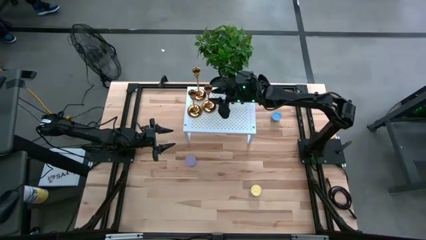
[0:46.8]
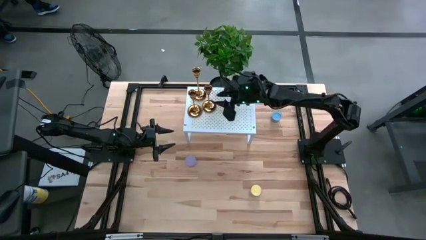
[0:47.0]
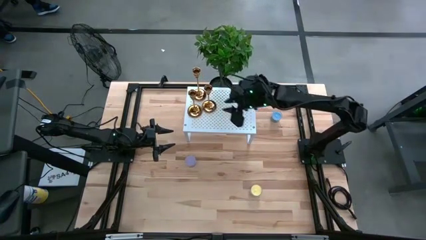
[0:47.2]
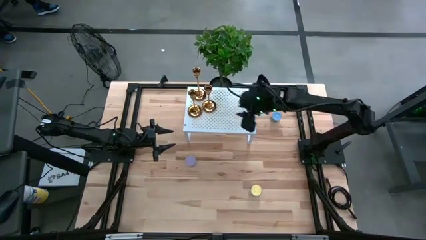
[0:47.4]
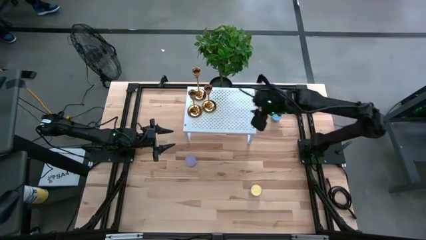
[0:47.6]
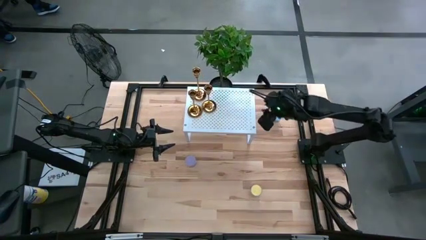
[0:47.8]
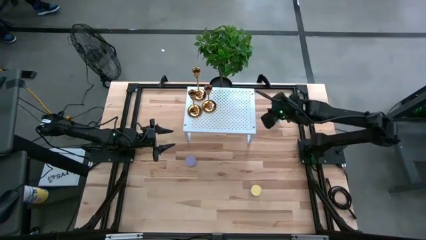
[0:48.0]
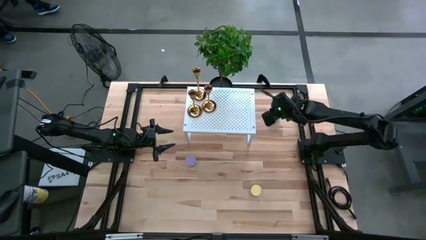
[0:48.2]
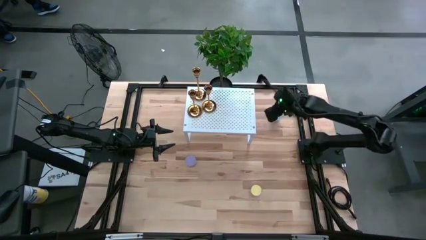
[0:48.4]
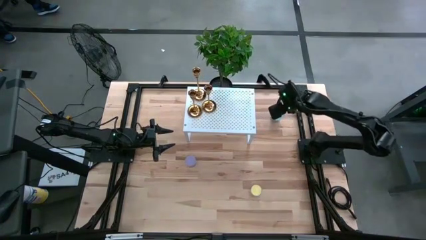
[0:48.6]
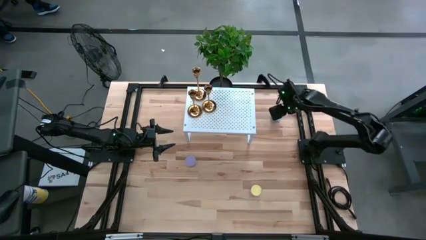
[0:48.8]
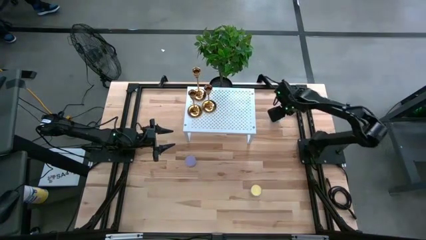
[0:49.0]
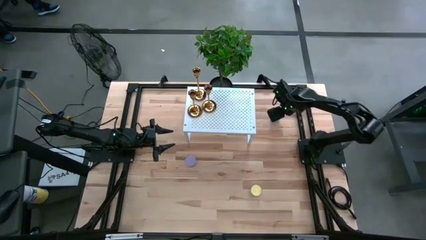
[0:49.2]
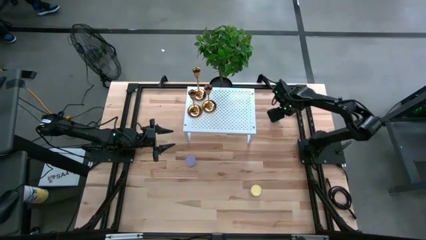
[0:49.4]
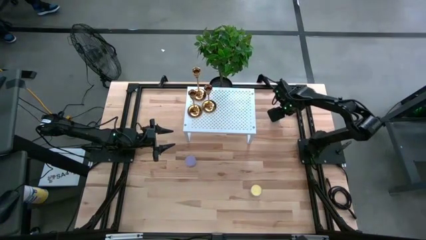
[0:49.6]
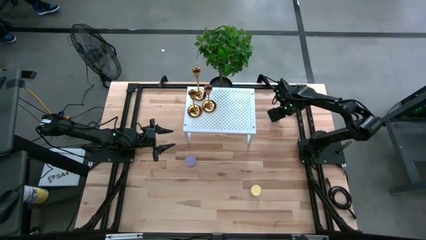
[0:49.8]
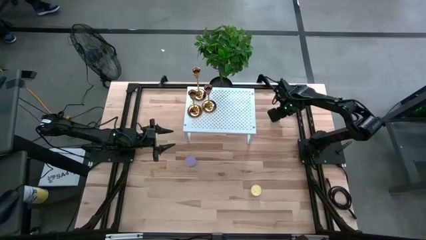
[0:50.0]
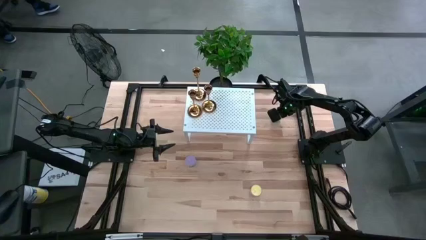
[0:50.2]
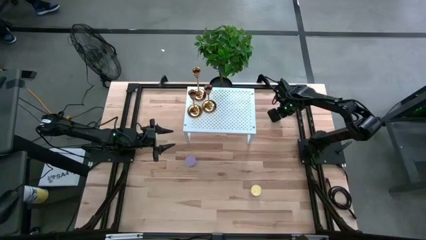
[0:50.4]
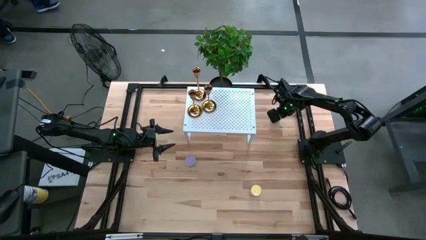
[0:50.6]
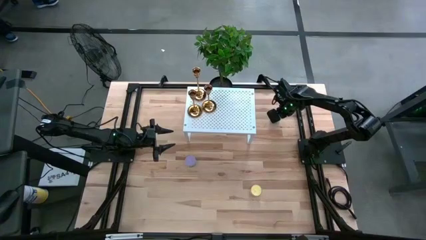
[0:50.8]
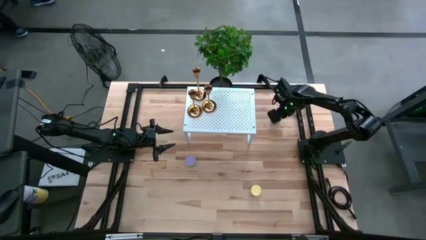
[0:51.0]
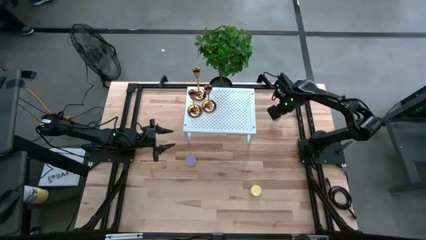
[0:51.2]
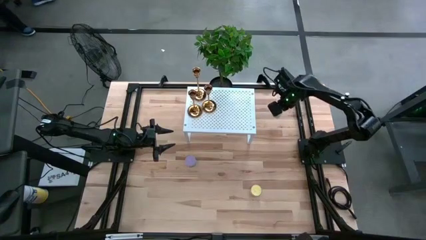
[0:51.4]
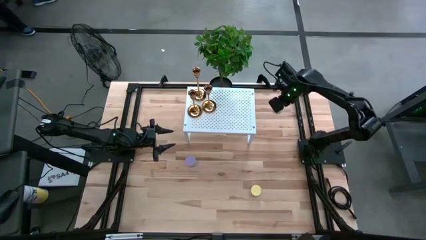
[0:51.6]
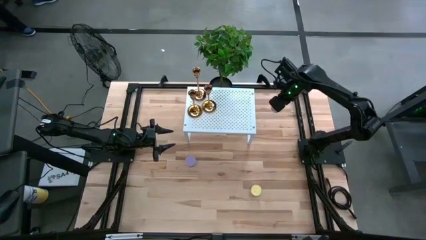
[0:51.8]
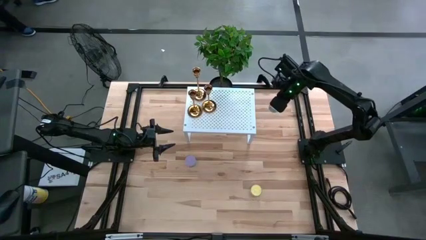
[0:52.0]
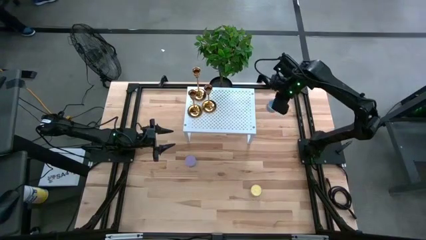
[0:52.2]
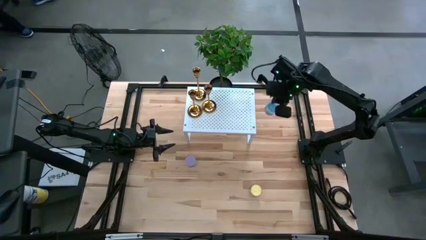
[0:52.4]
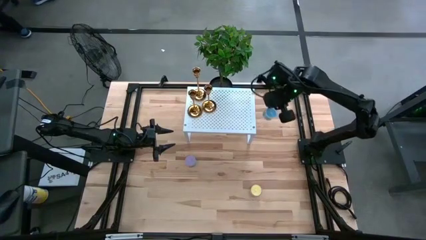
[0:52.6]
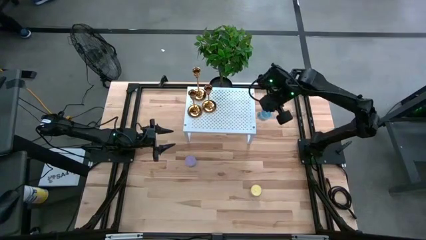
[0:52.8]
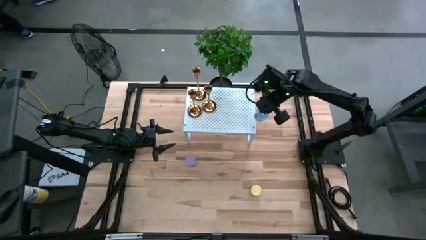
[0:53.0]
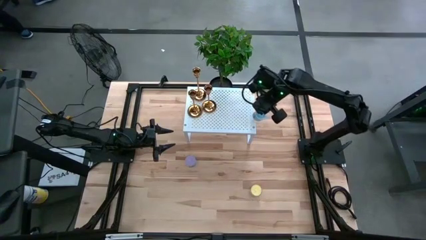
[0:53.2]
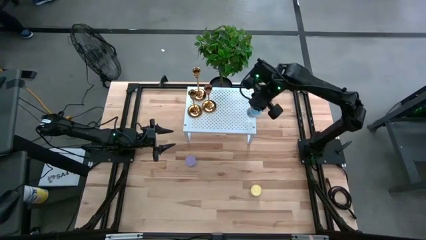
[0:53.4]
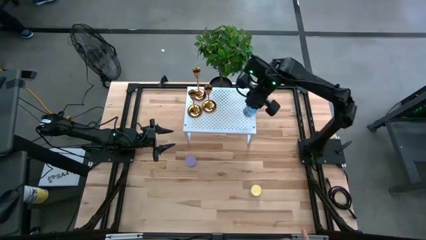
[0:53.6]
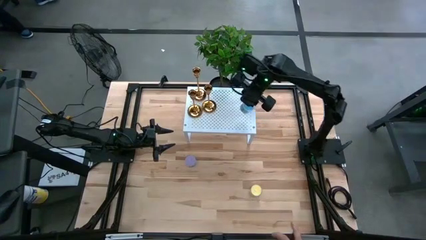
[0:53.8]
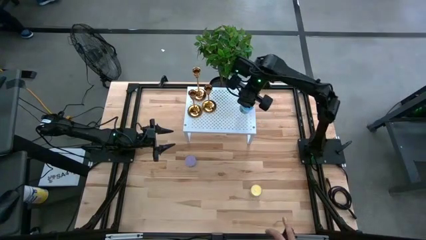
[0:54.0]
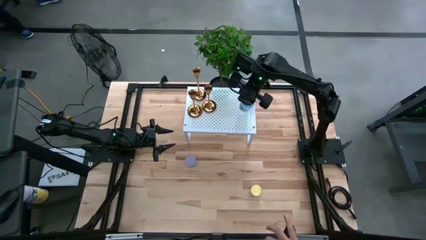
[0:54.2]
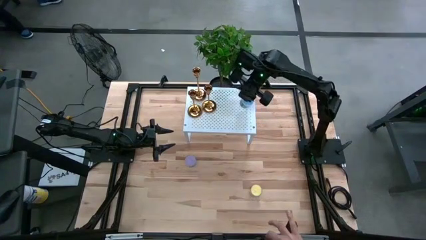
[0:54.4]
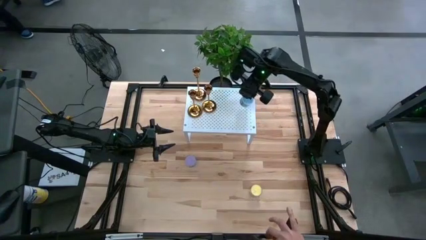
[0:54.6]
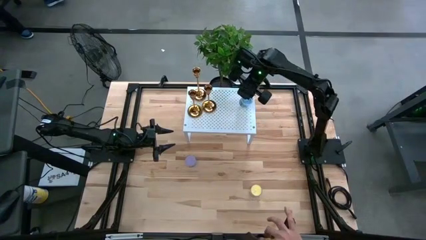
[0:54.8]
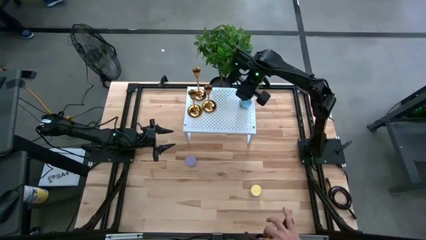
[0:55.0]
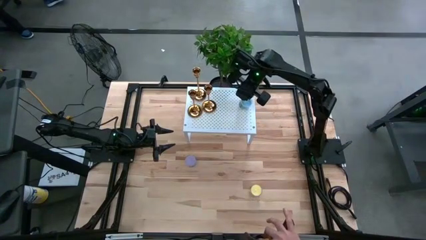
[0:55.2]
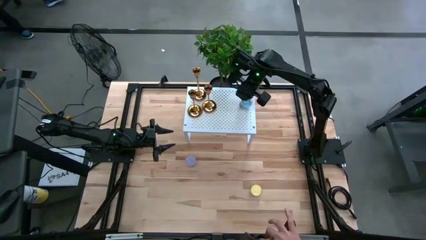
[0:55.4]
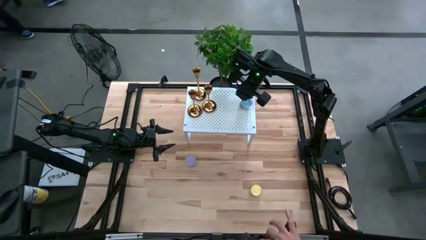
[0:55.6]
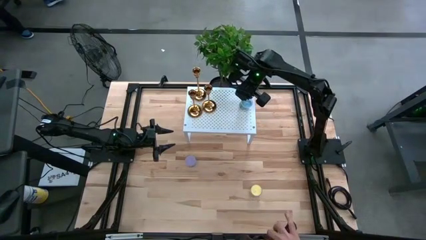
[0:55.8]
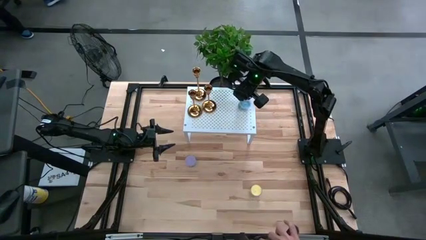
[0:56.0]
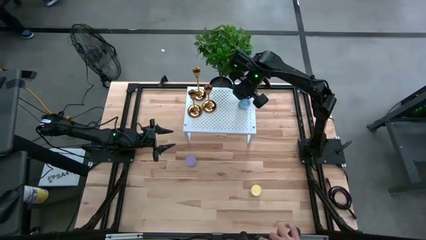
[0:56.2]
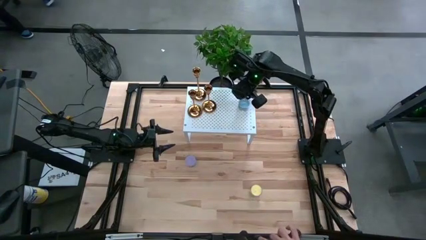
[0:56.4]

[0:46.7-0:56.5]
Task: Pick & Place candle stick holders
Put the blue scented candle on the shelf

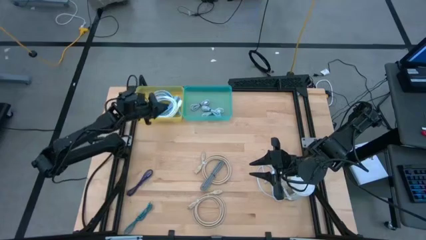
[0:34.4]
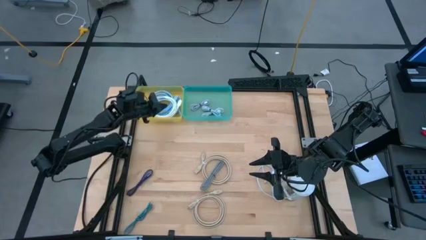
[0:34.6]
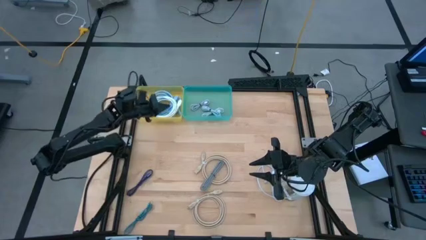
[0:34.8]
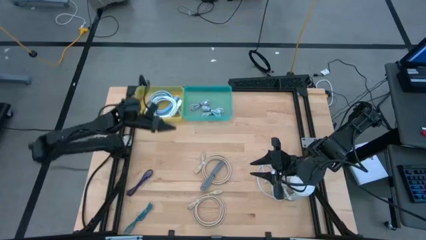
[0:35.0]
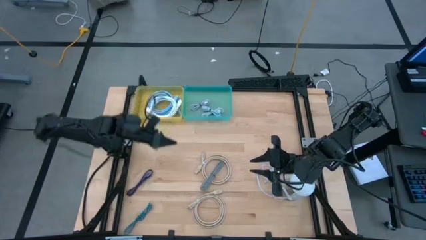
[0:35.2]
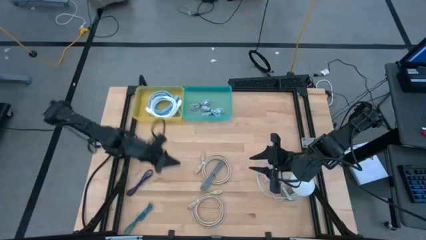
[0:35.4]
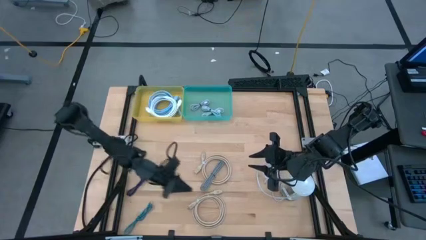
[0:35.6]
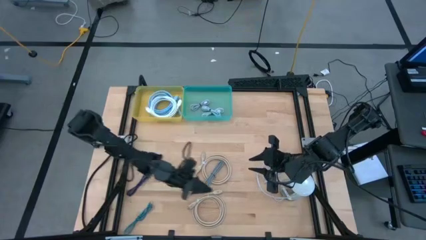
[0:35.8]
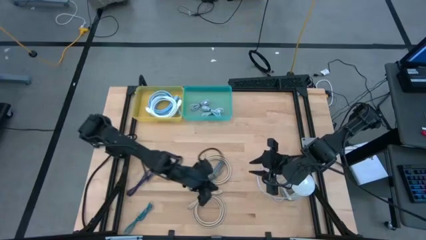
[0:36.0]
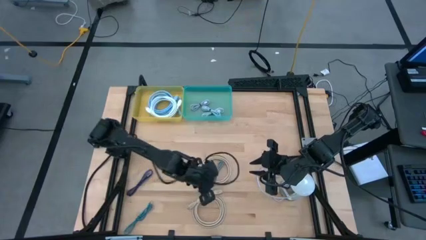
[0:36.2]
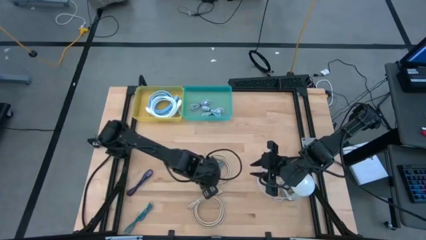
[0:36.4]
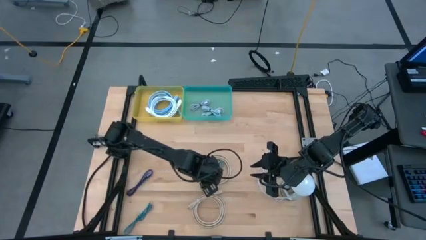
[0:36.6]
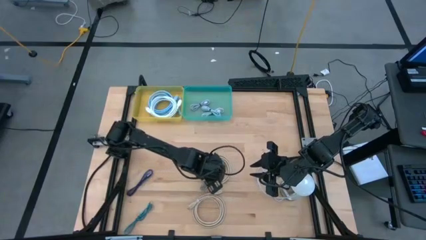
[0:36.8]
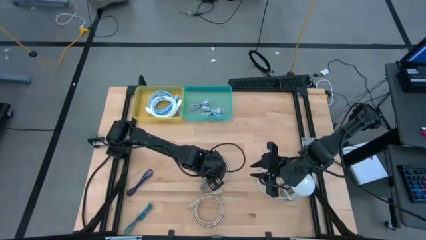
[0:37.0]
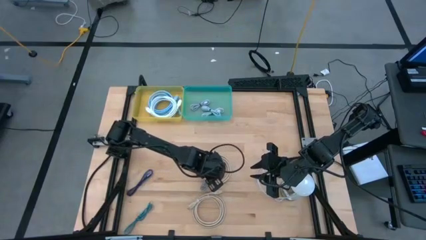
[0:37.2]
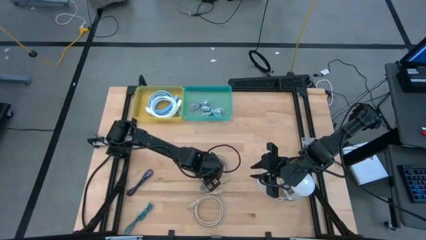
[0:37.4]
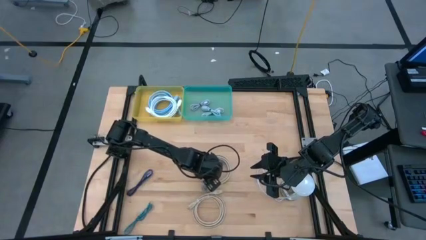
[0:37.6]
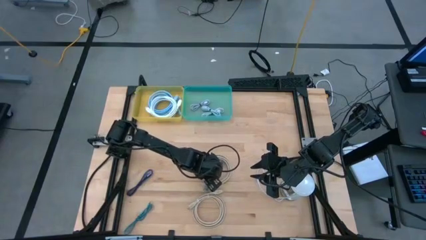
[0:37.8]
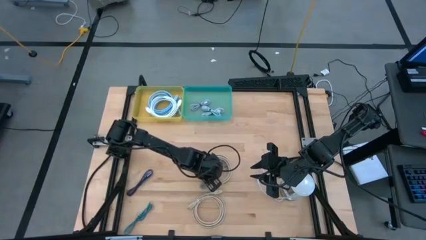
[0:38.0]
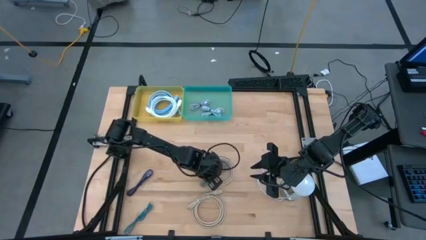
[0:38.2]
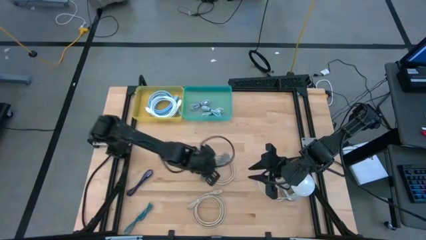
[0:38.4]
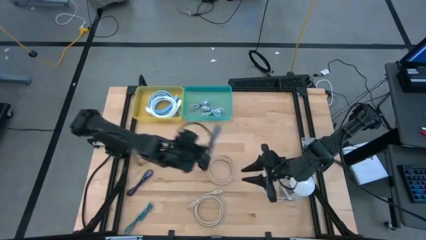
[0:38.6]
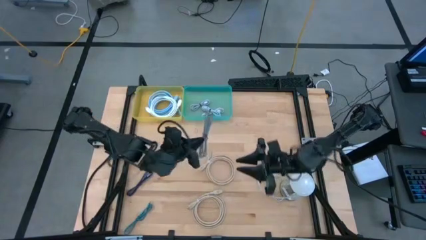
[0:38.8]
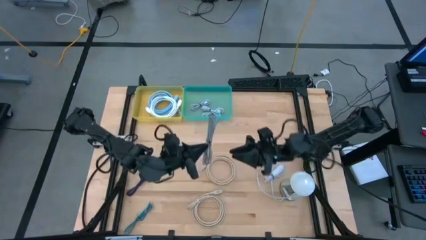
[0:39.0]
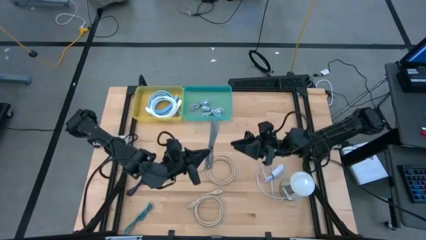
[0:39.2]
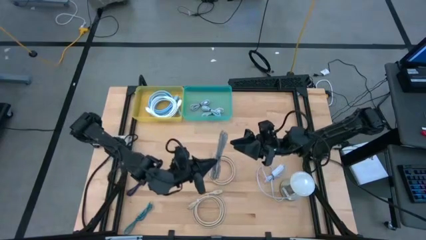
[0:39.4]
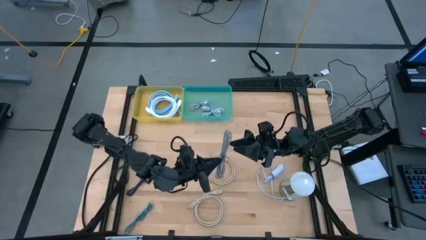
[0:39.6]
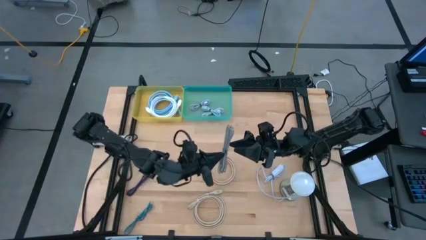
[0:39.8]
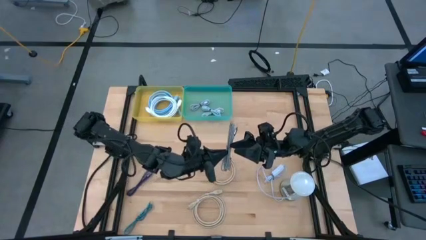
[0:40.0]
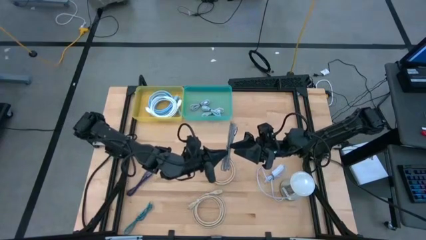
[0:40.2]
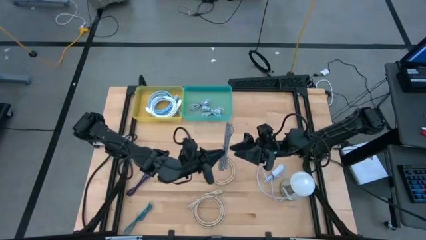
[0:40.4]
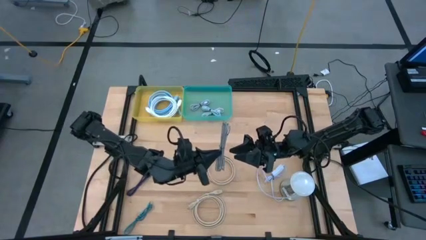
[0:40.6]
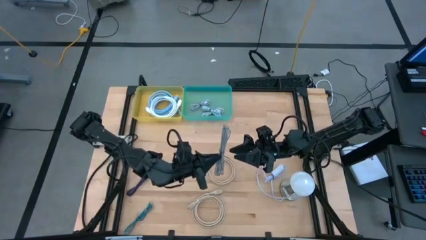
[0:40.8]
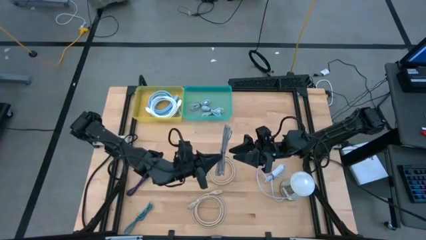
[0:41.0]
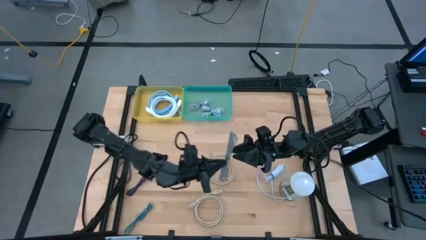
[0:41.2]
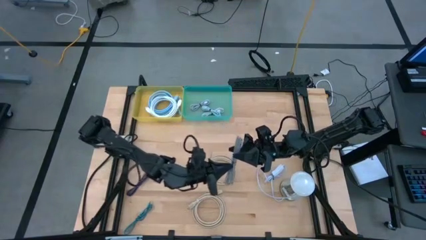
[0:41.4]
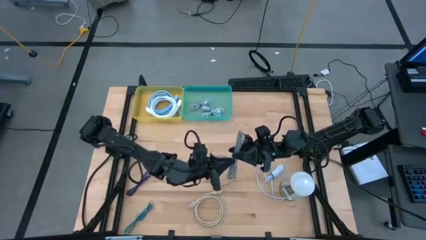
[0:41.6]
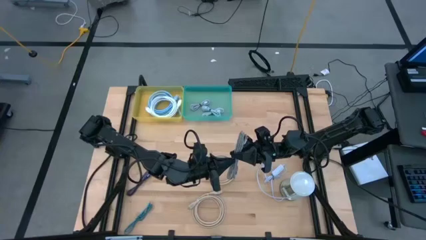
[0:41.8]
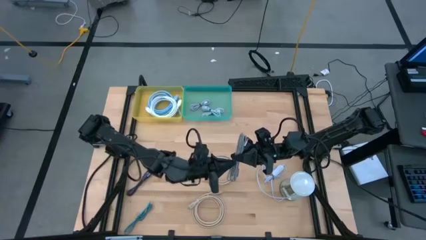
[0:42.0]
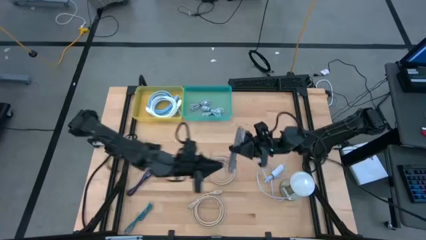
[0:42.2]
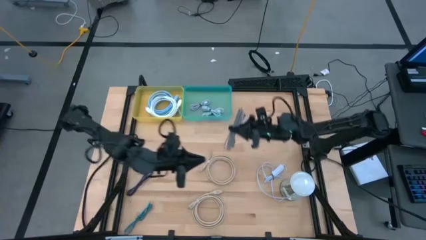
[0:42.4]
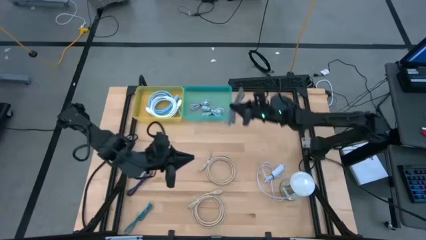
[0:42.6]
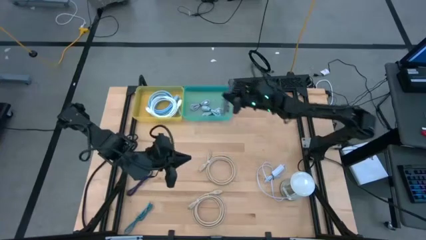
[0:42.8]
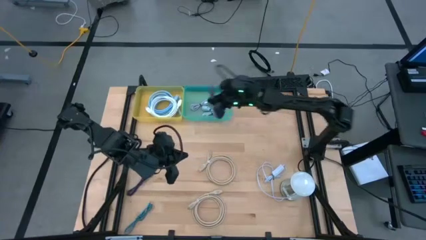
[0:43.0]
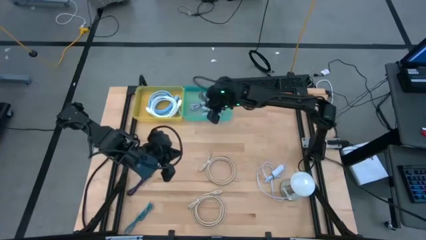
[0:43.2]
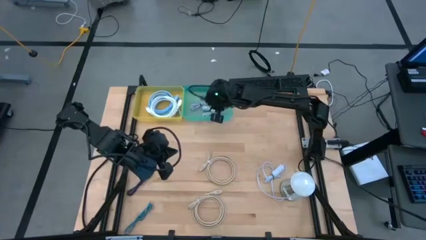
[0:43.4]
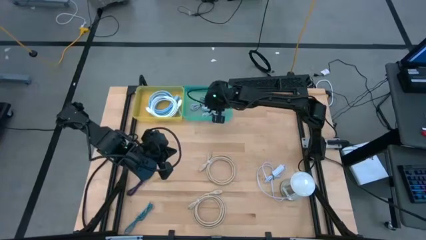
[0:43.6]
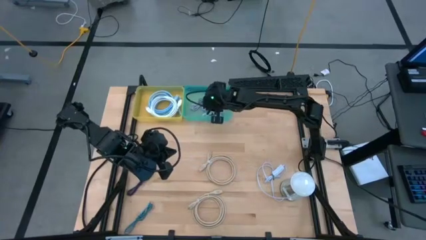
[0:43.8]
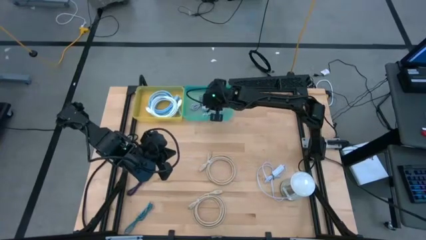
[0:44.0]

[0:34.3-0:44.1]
Task: Pick & Place USB Port
Put the black charger cable into the green bin
